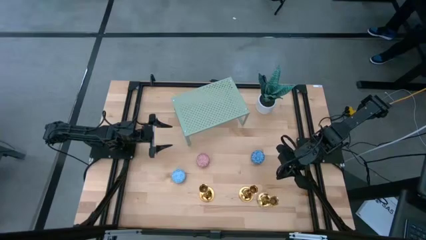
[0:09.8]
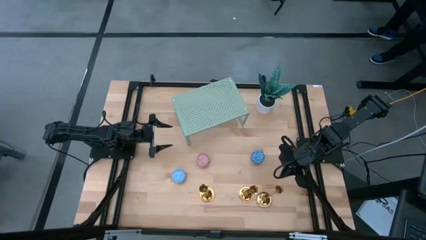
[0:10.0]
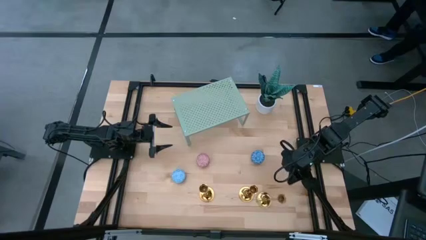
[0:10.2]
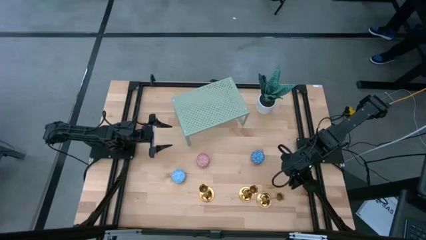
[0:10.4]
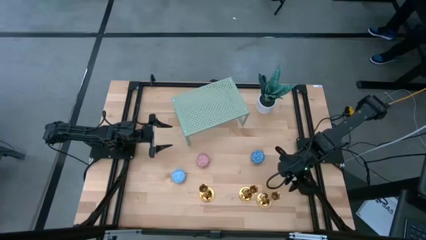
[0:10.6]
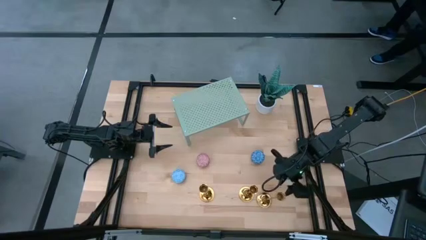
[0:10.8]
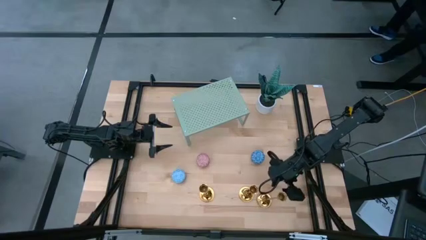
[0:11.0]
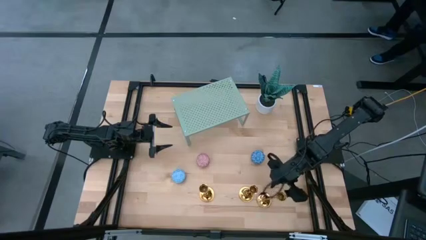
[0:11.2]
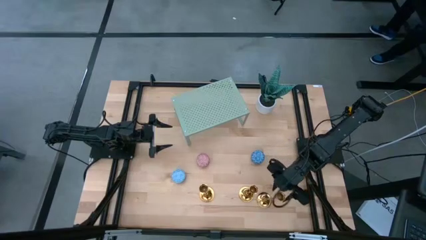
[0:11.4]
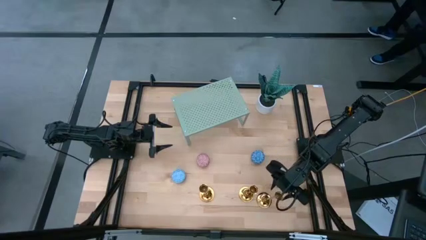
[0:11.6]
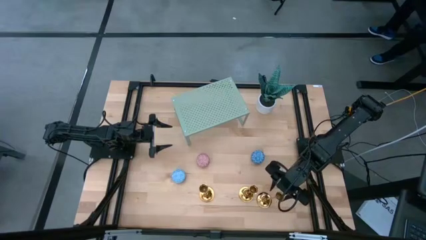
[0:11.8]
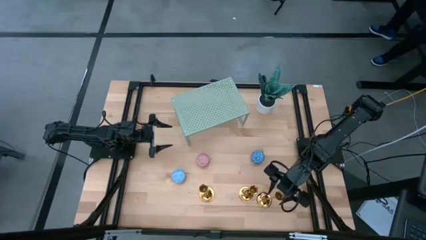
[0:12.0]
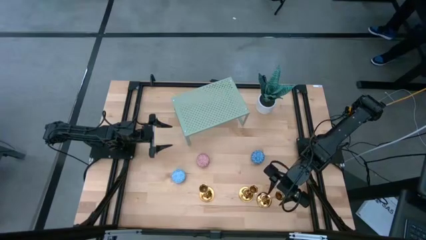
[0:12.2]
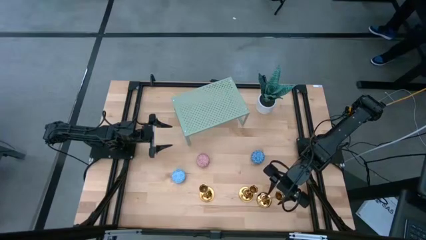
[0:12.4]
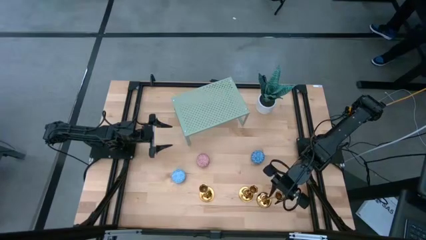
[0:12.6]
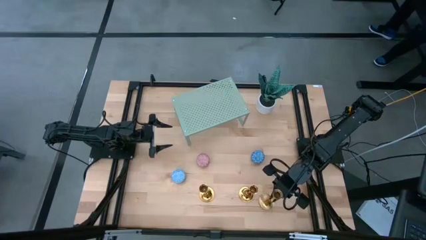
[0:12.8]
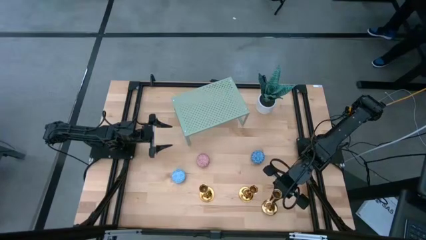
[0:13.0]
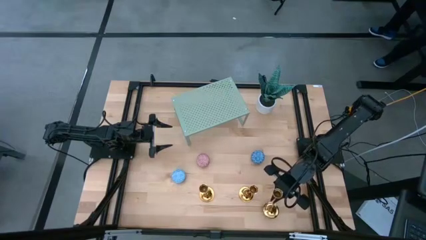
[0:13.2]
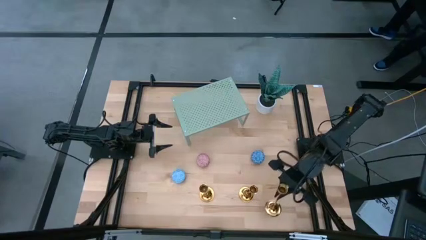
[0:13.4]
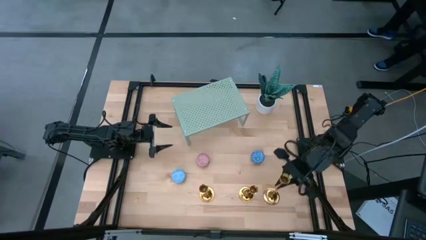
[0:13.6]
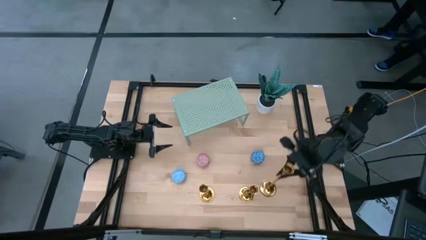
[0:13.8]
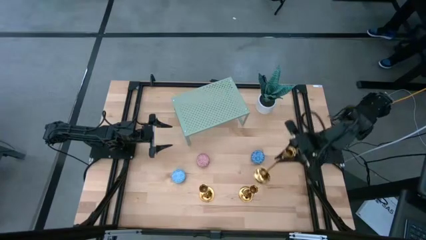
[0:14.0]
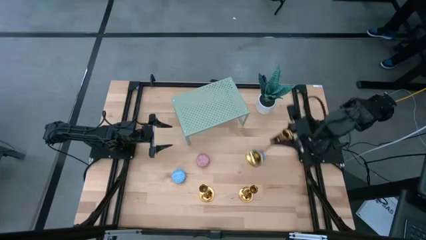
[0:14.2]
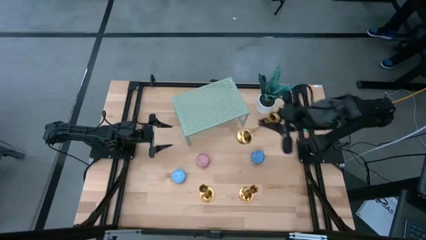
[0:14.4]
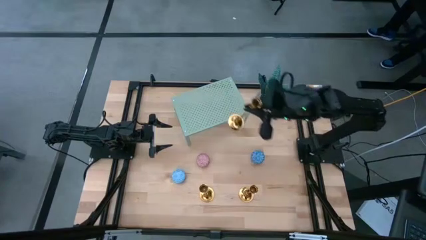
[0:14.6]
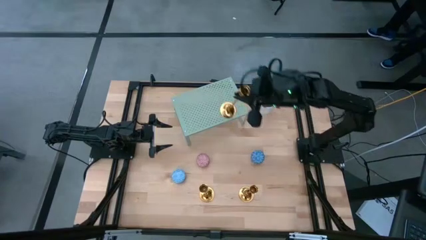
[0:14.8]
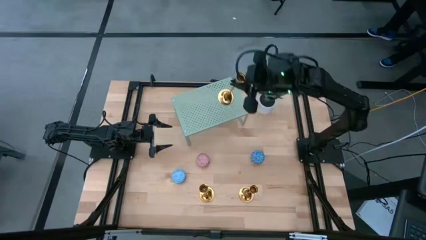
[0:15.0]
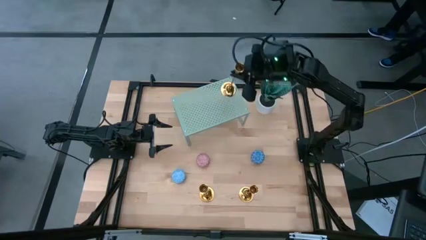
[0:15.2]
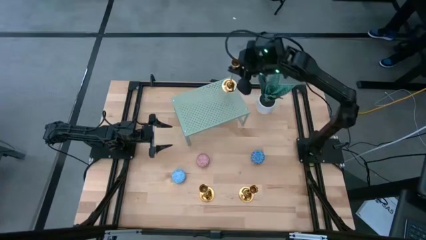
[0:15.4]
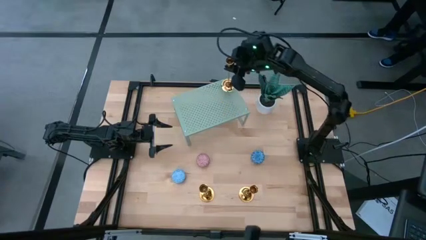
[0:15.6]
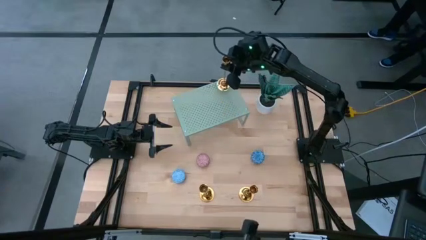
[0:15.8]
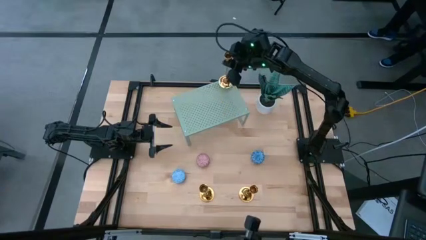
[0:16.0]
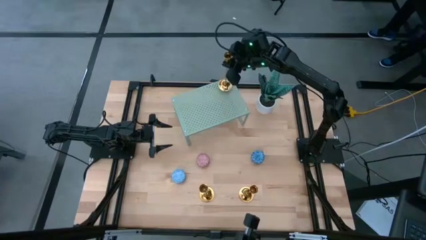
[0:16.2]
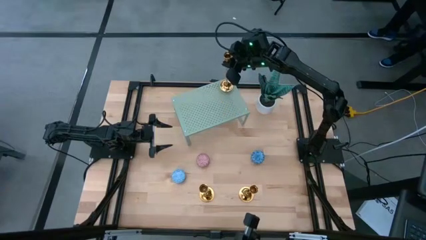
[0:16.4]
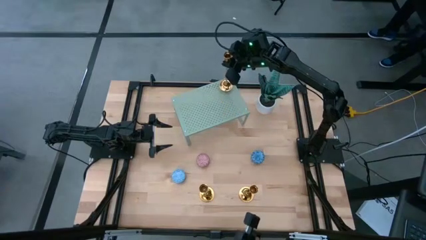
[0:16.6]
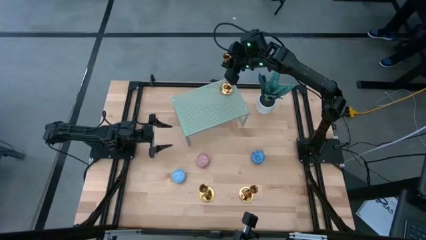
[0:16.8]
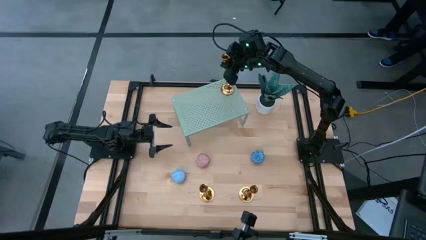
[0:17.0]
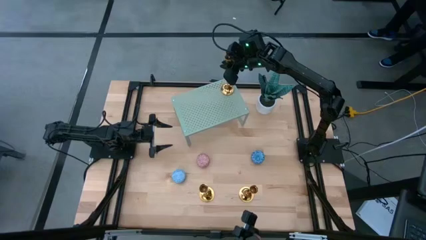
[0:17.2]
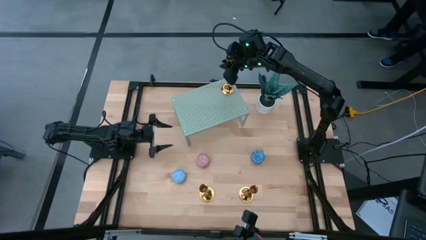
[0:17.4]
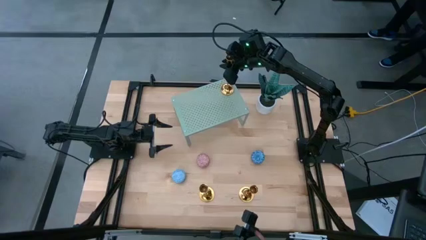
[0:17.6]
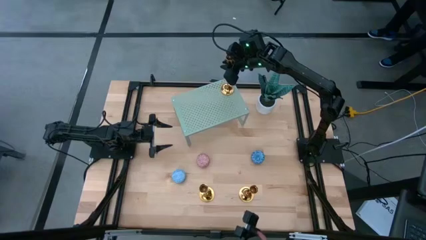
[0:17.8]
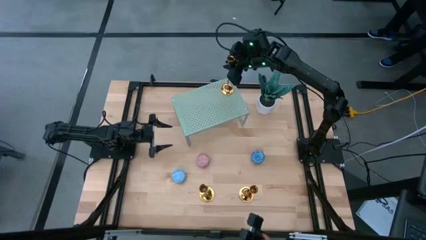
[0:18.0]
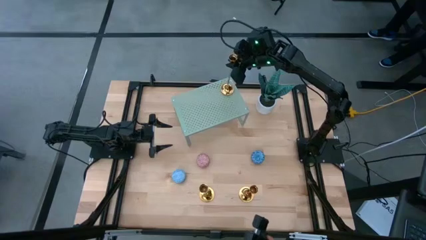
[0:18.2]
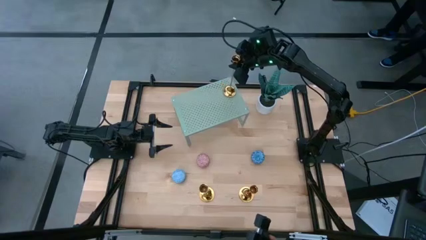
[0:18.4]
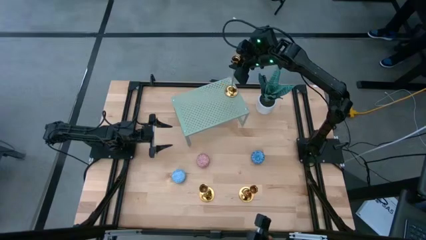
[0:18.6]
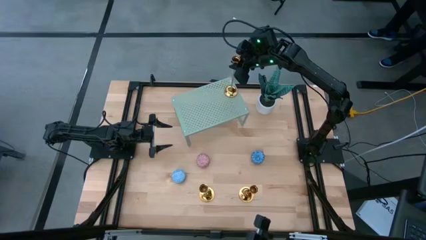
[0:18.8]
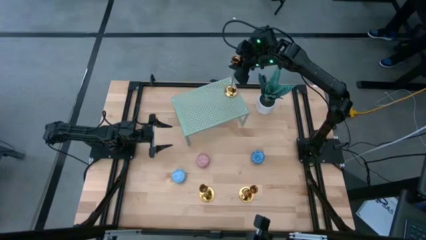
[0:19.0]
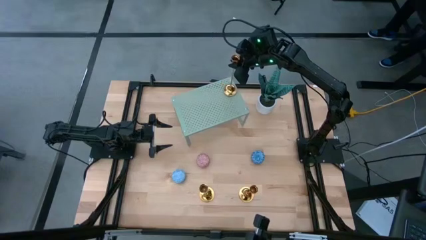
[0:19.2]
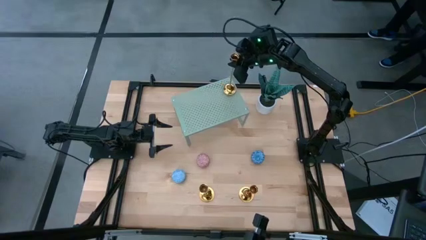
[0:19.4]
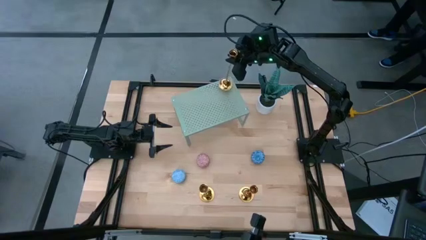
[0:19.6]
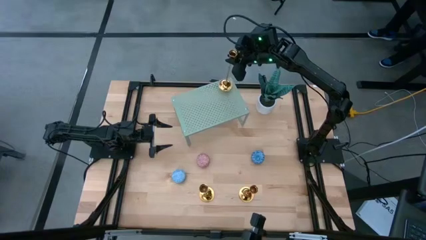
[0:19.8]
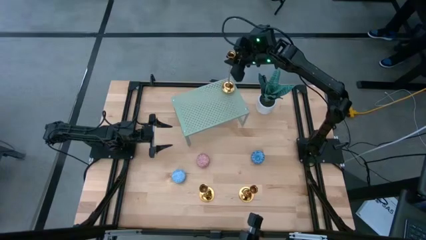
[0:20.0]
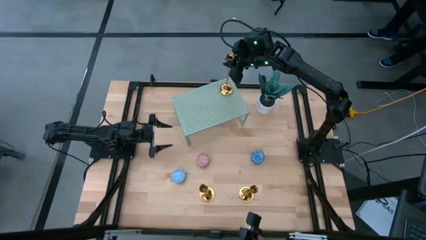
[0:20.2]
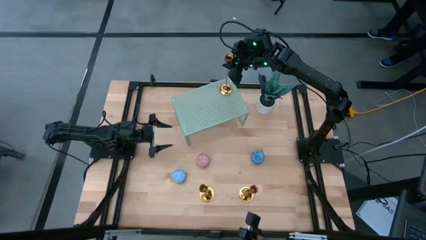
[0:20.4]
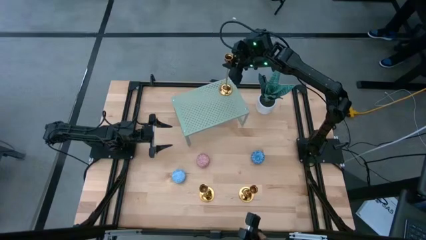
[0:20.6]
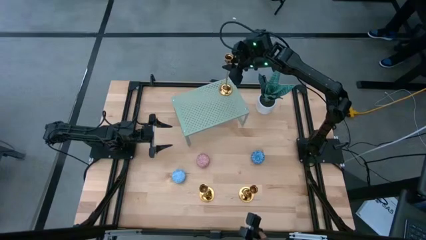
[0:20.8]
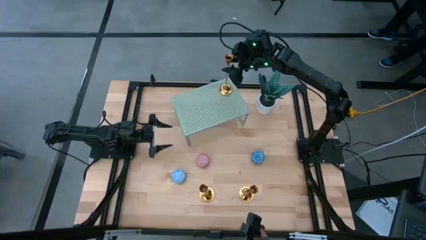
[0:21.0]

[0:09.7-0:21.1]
Task: Pick & Place candle stick holders
Put the right gold candle holder on the shelf

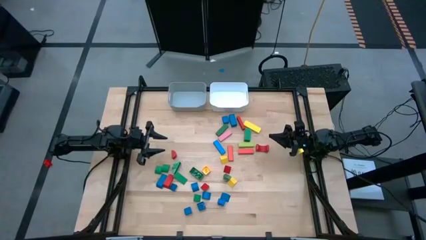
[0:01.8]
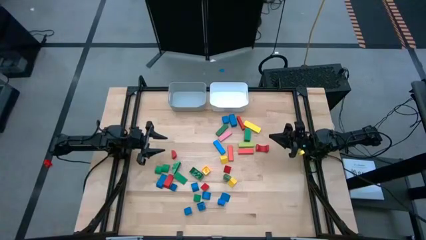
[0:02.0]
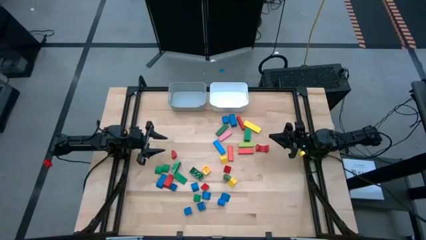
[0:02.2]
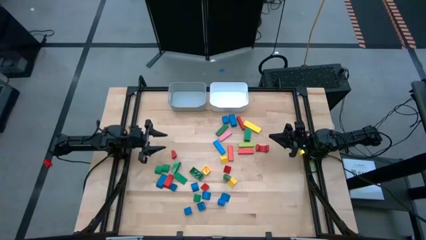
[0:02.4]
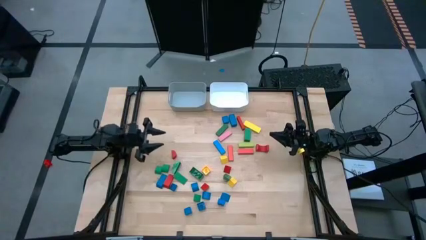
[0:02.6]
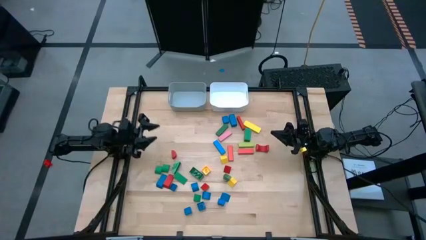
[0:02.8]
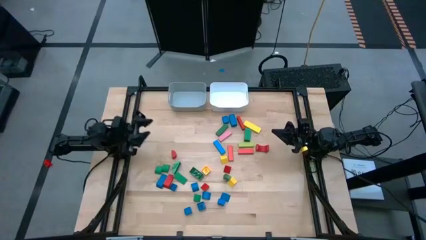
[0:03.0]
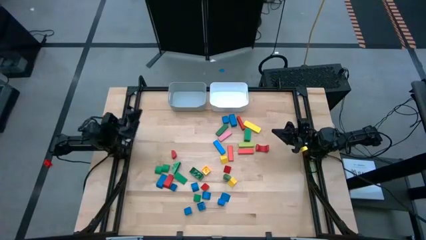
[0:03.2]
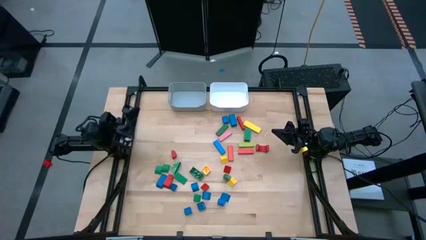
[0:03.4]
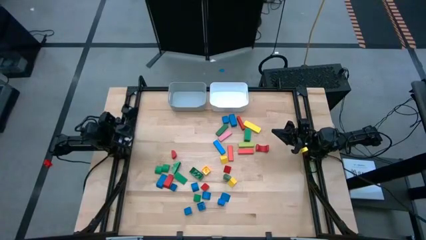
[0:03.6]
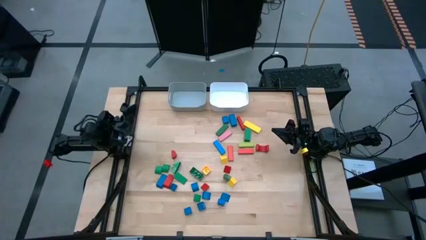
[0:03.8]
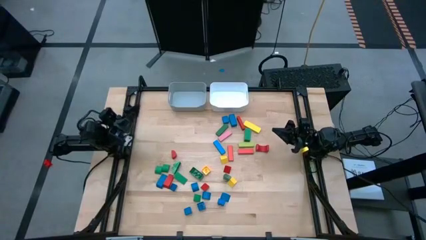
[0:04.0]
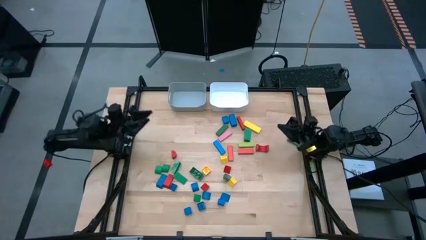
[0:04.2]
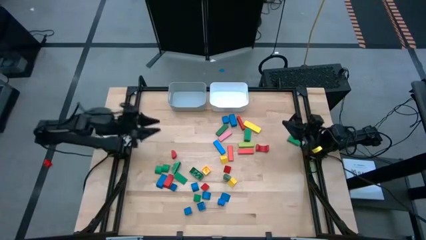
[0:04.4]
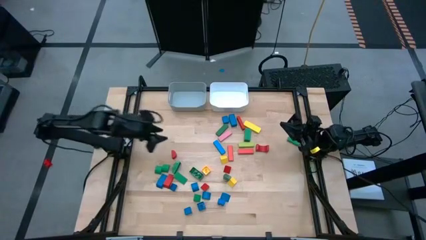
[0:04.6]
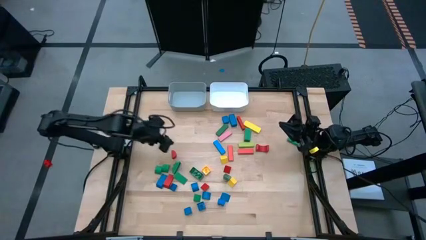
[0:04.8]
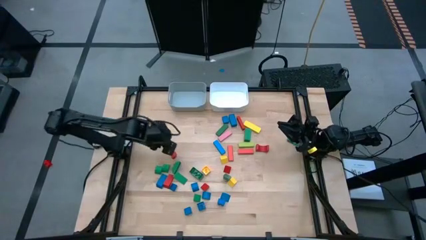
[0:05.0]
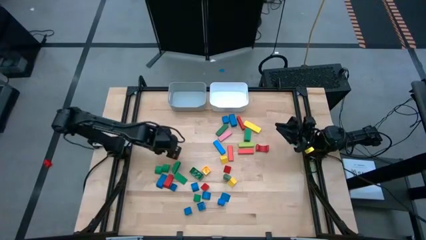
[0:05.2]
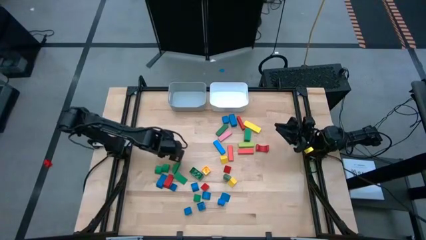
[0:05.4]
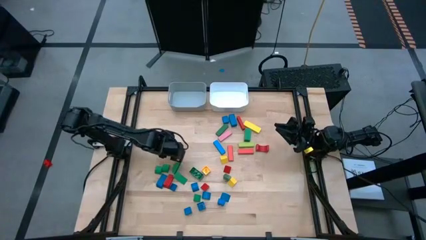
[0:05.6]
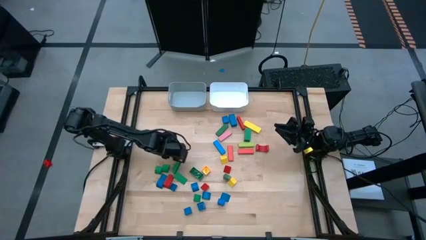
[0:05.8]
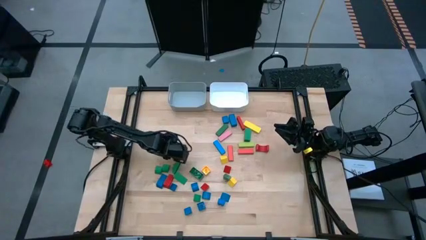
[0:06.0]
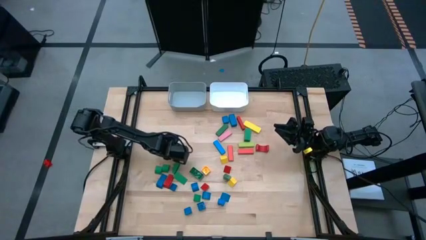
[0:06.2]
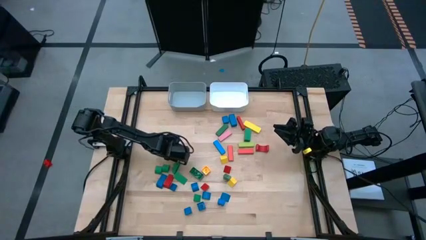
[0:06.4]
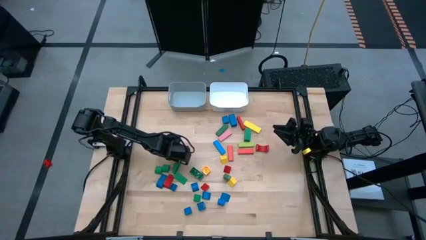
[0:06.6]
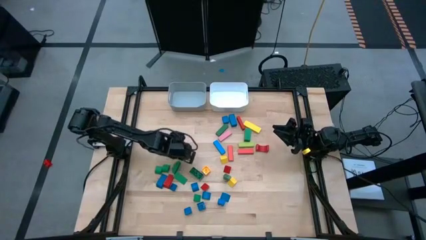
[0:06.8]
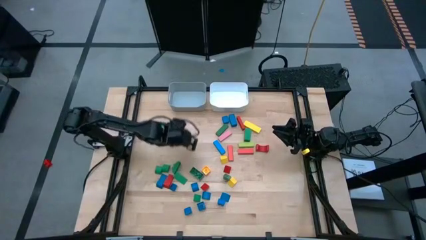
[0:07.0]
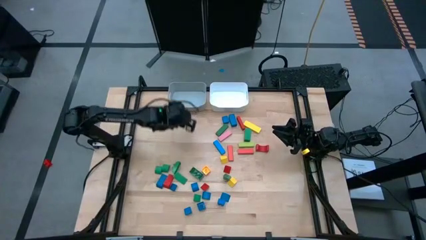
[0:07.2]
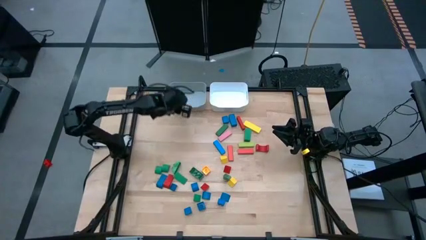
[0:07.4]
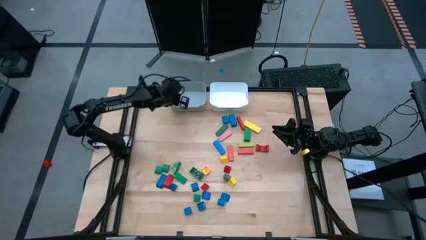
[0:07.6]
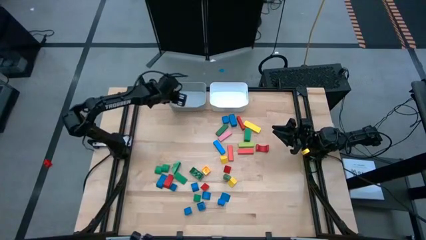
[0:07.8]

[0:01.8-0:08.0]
Task: Sort blocks by size
Put the red semi-circle block into the gray bin
